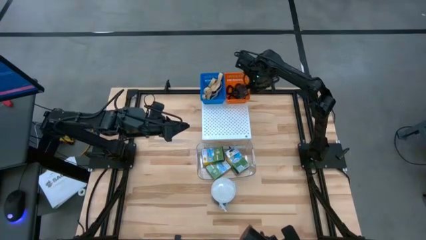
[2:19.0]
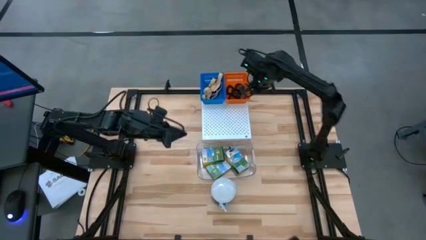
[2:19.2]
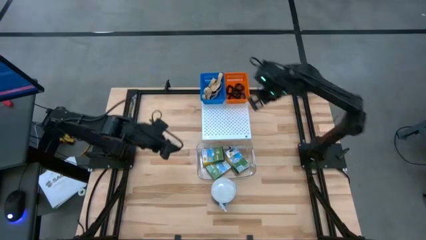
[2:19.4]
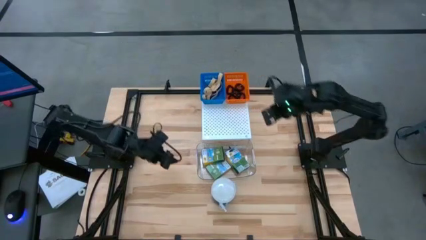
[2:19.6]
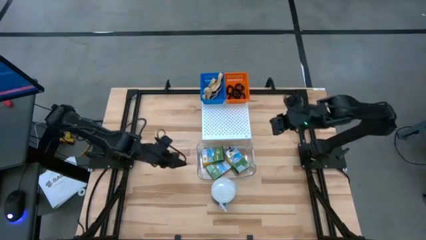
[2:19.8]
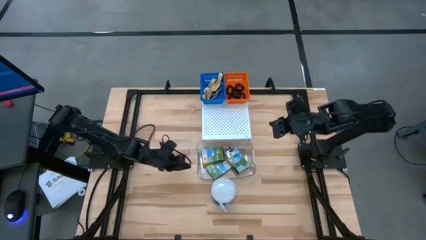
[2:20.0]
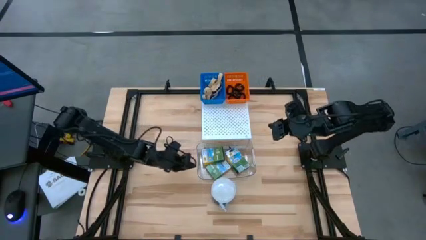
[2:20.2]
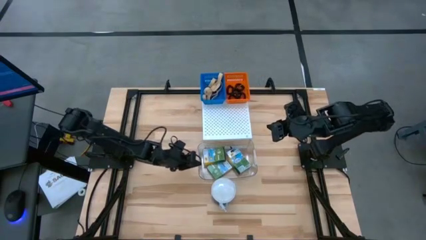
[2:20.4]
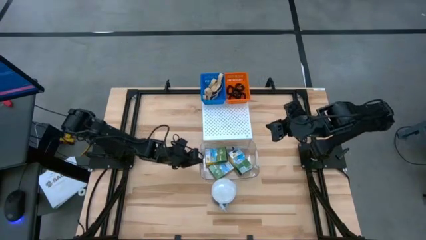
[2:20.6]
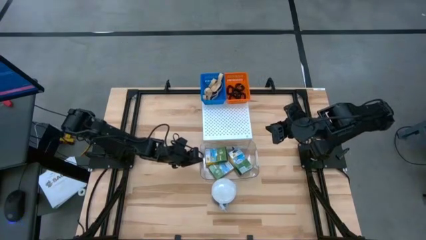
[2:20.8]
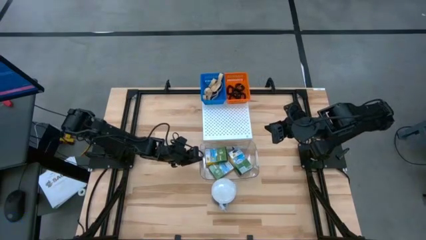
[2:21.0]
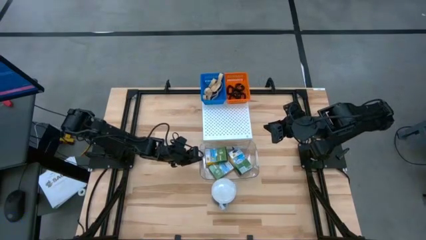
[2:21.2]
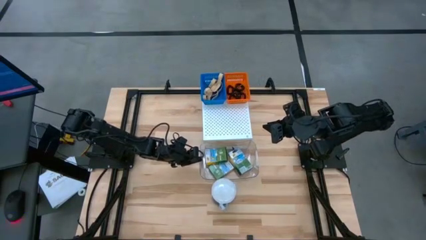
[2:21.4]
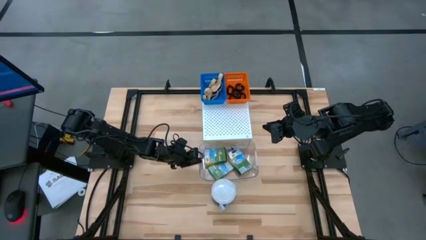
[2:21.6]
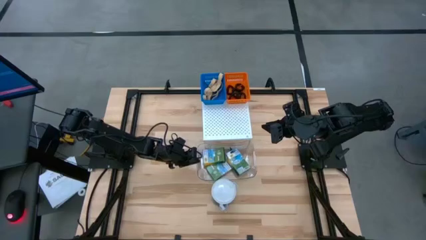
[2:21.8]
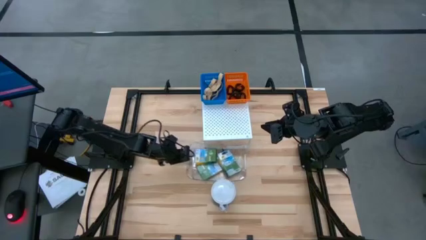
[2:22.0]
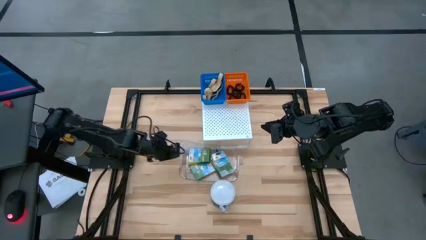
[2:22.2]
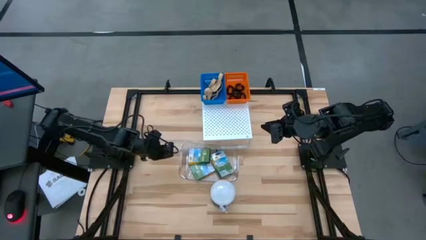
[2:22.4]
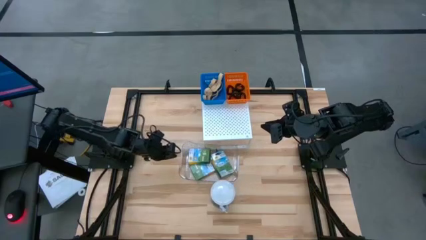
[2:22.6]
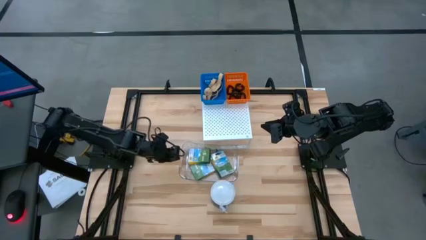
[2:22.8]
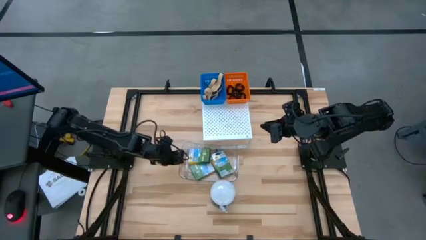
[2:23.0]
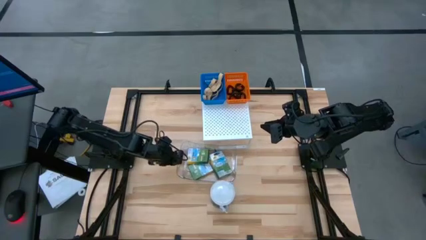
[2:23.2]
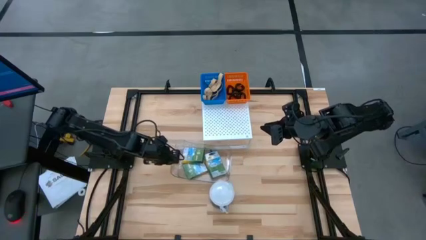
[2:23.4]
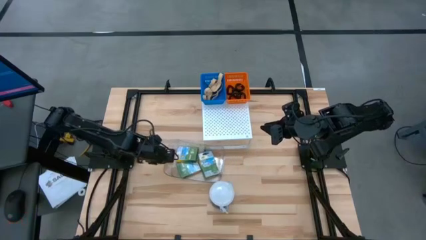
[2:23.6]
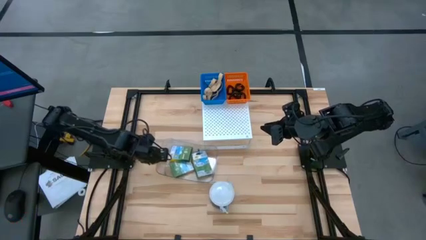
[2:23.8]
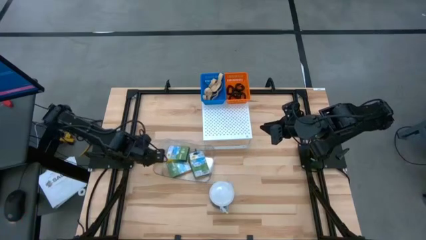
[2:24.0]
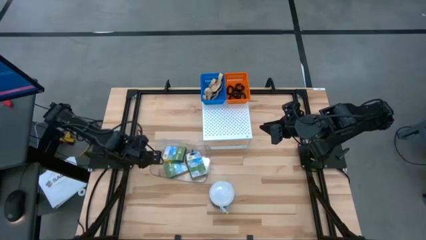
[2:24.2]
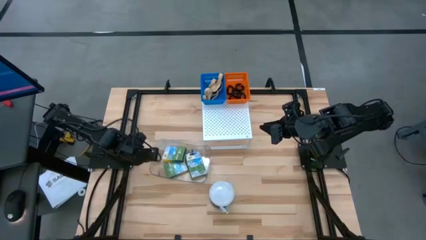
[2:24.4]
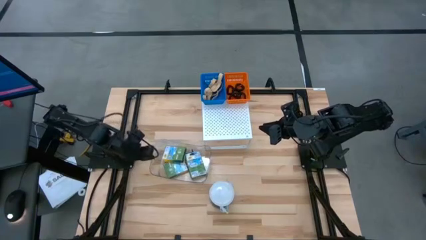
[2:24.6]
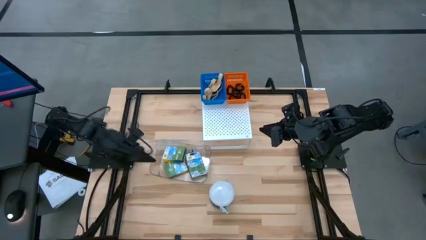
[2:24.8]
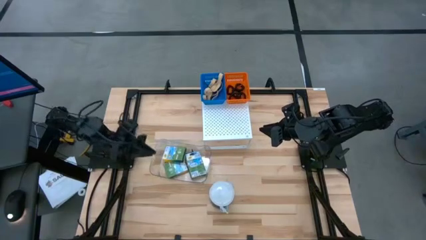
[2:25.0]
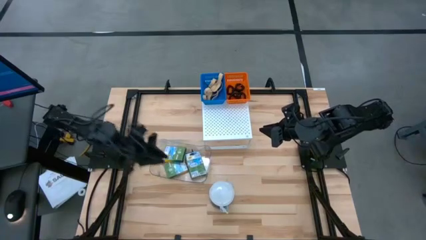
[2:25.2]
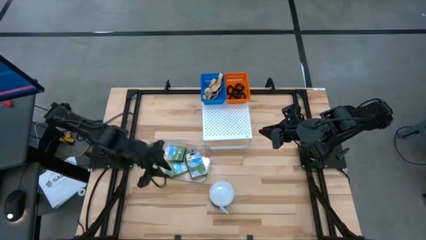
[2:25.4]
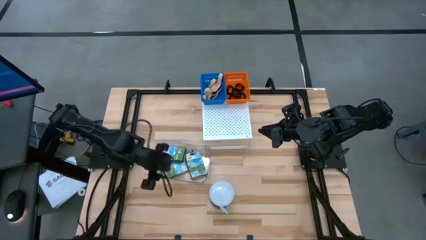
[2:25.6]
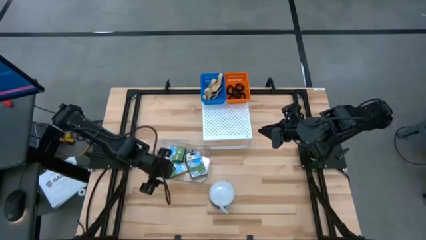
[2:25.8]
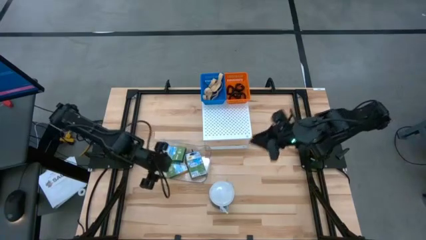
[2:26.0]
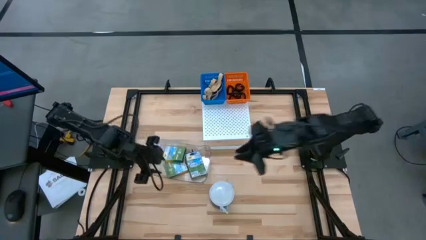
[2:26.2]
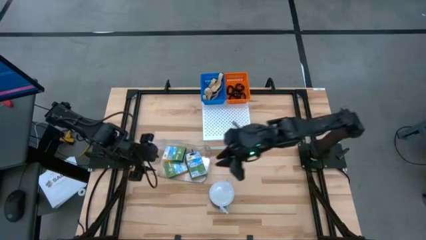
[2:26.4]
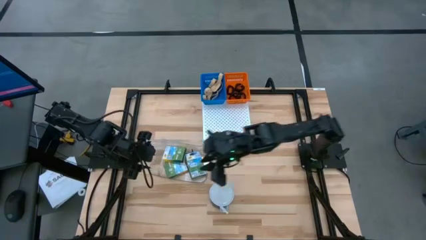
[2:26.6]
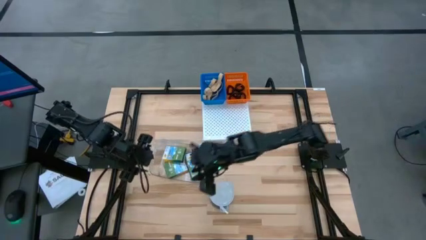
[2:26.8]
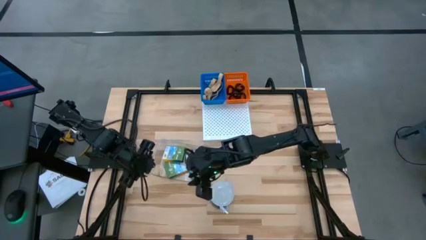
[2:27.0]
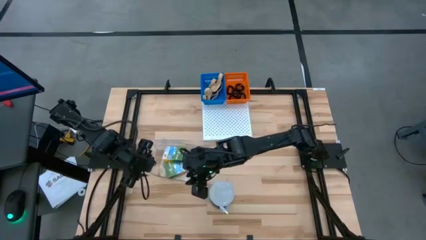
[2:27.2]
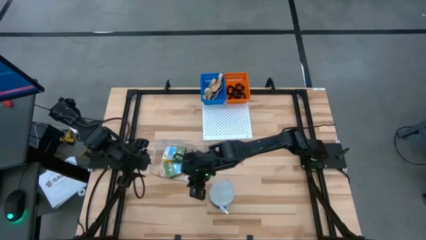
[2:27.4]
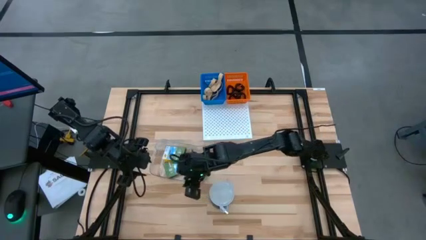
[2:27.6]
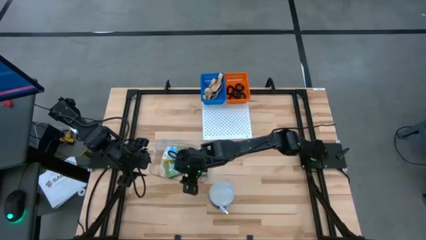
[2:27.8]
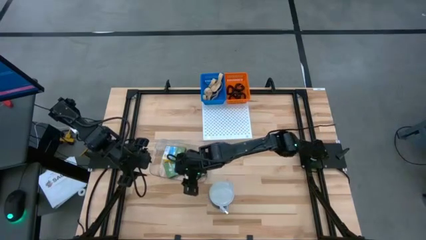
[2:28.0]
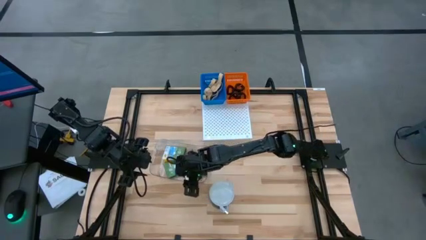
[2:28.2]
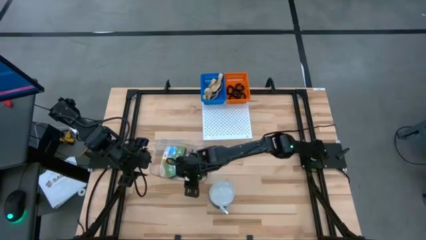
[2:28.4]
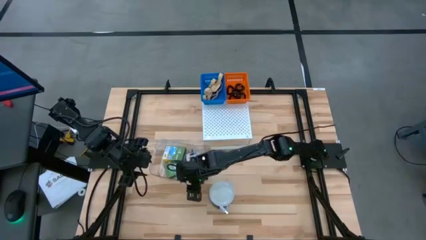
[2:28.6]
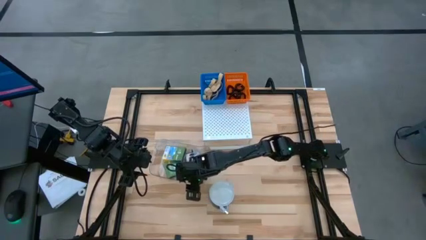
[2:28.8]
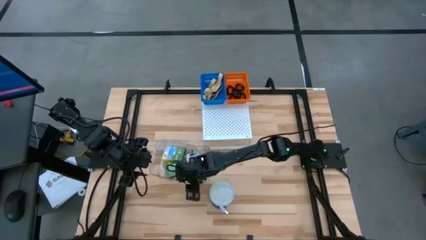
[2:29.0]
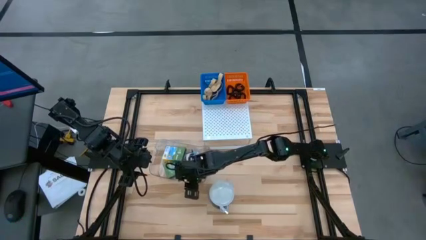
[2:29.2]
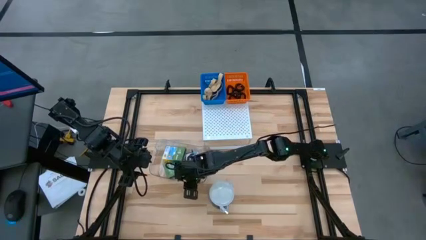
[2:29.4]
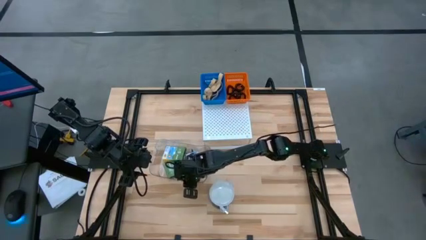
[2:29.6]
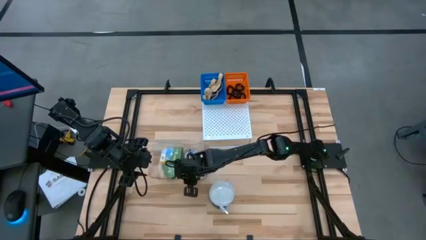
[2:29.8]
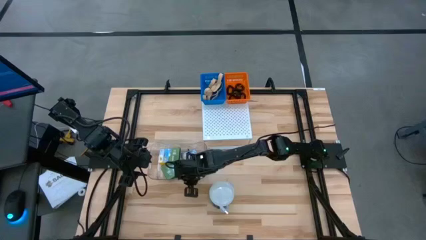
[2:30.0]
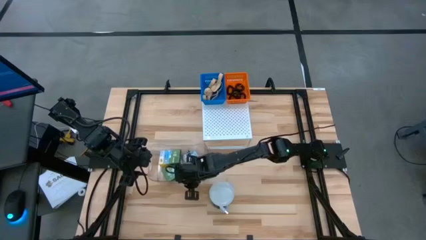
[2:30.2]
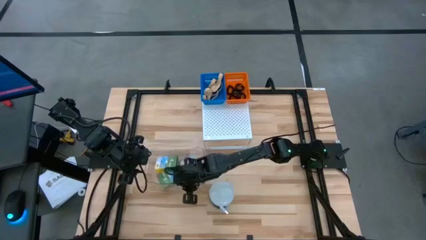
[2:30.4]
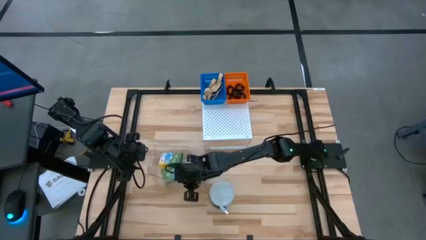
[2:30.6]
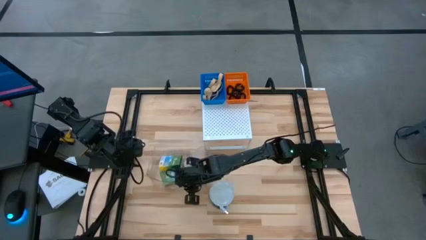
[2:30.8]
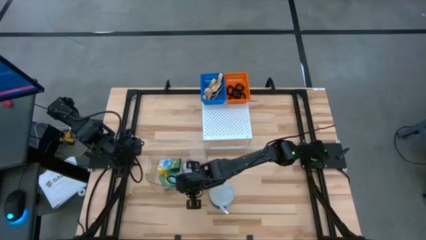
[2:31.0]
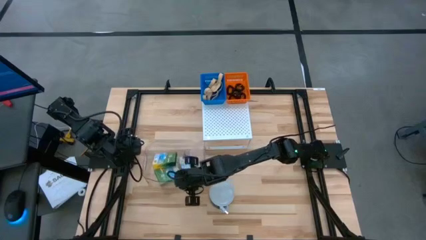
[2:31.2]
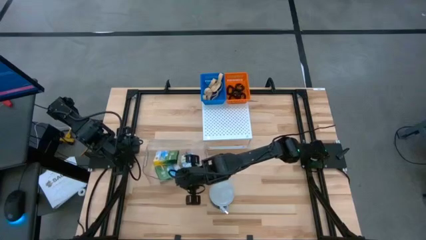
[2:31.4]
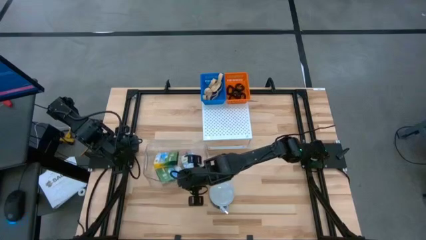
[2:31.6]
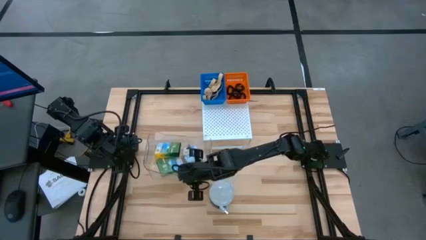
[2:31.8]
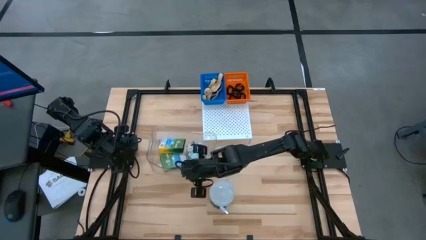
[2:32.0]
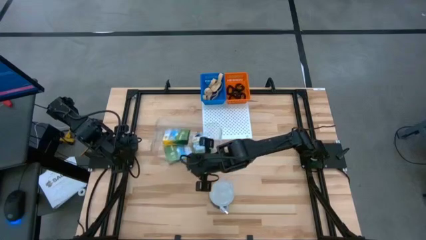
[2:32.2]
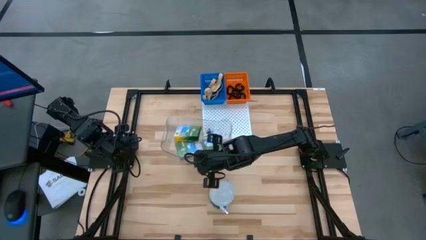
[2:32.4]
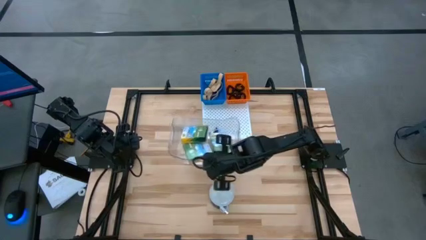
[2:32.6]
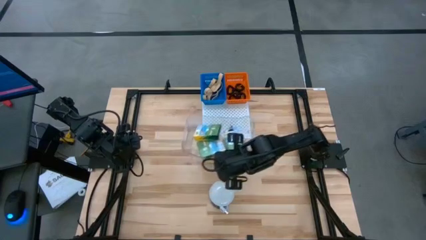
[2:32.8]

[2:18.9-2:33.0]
Task: Pick & Place Office Desk Supplies
Put the transparent bin with crayon boxes on the shelf
